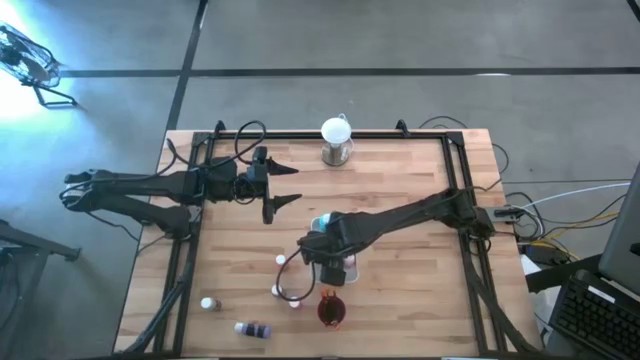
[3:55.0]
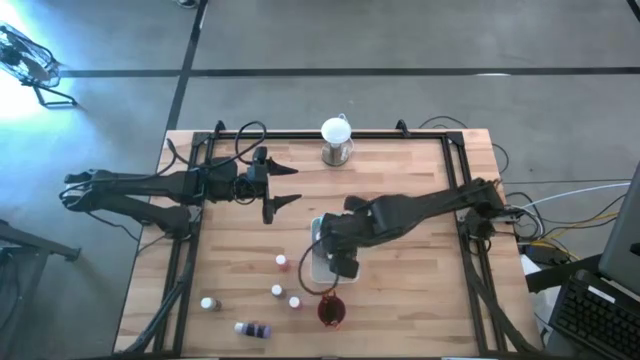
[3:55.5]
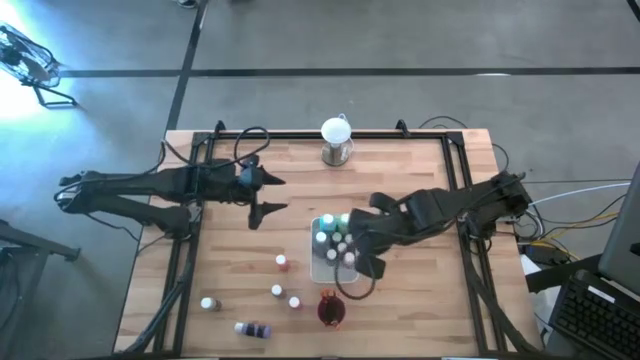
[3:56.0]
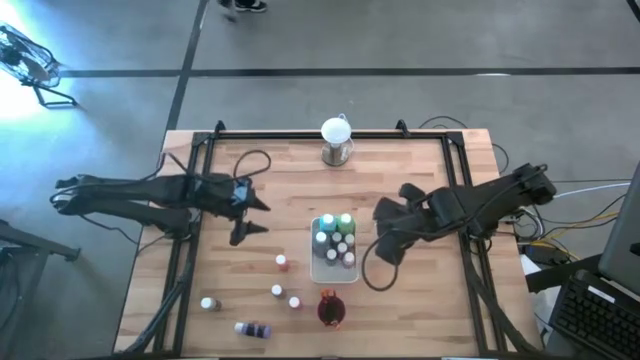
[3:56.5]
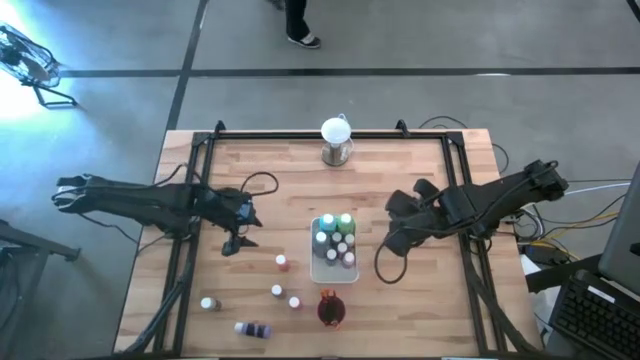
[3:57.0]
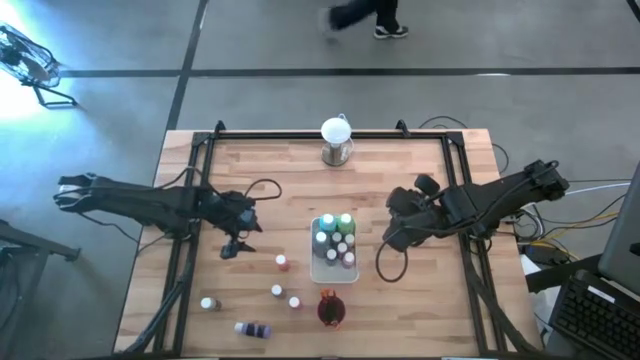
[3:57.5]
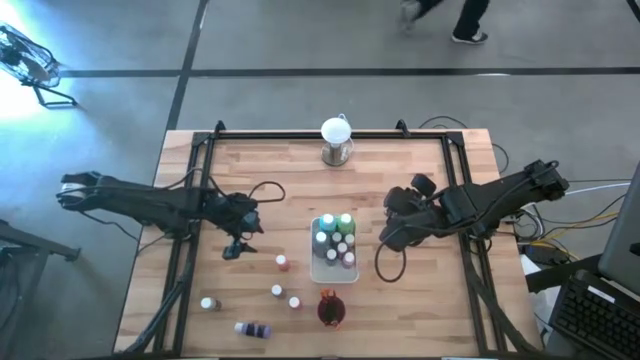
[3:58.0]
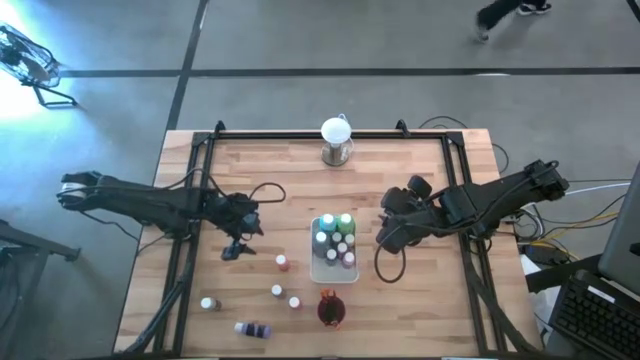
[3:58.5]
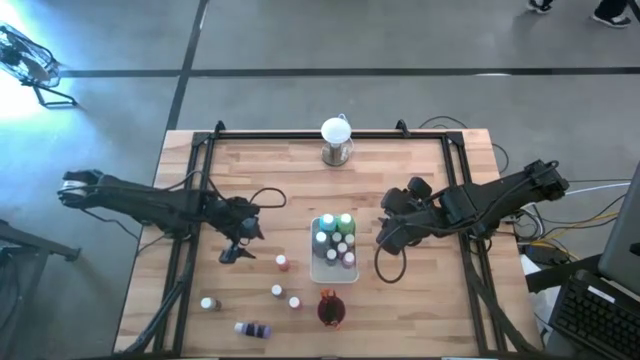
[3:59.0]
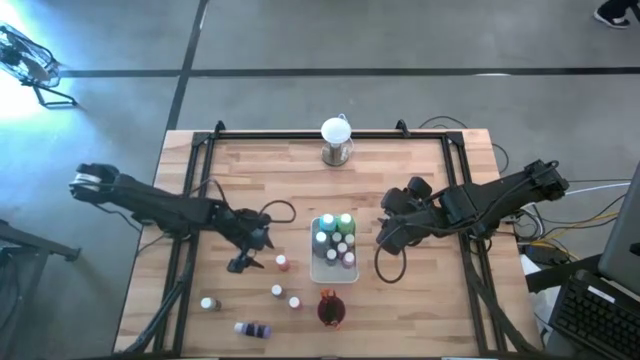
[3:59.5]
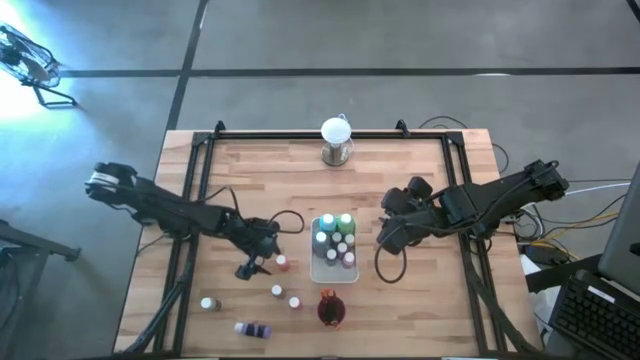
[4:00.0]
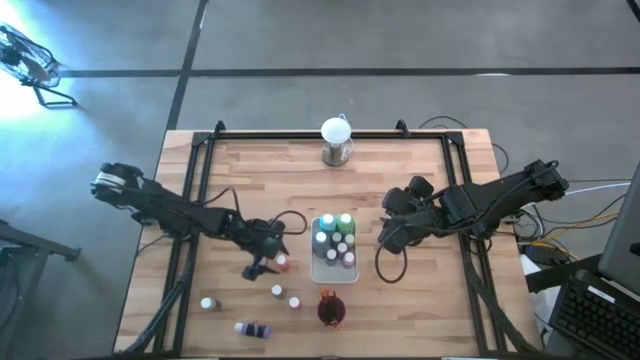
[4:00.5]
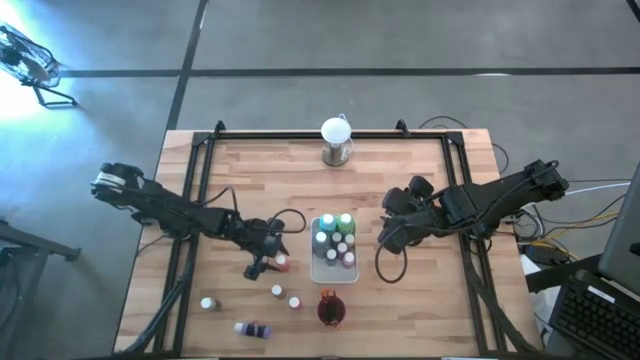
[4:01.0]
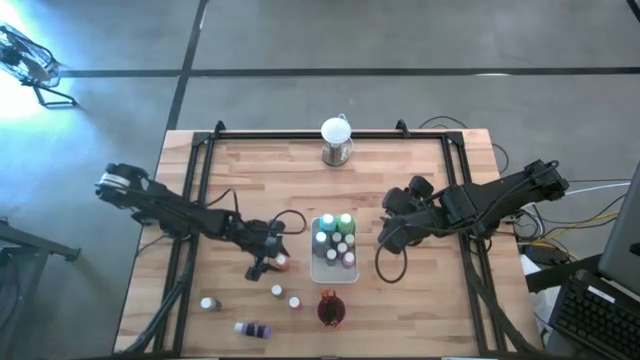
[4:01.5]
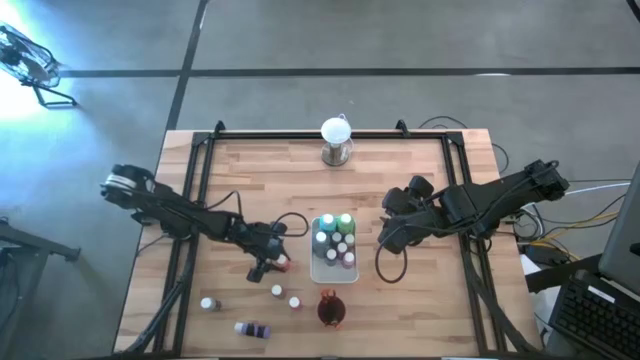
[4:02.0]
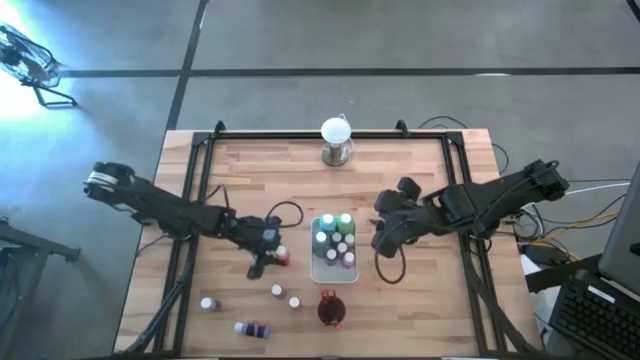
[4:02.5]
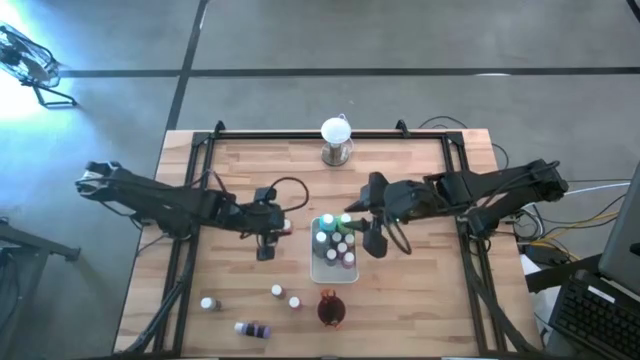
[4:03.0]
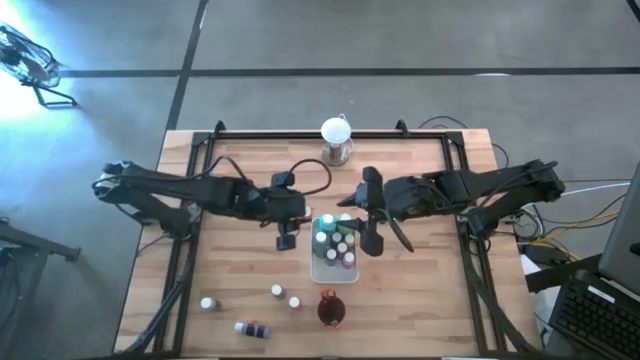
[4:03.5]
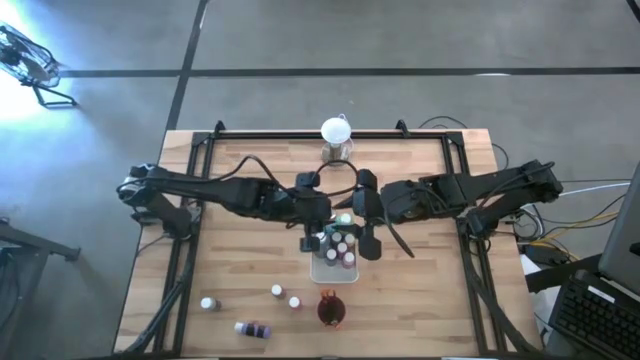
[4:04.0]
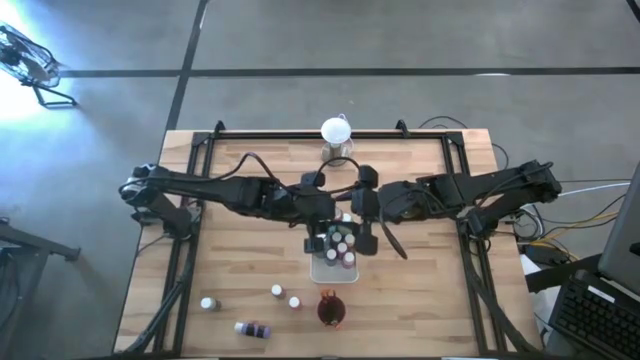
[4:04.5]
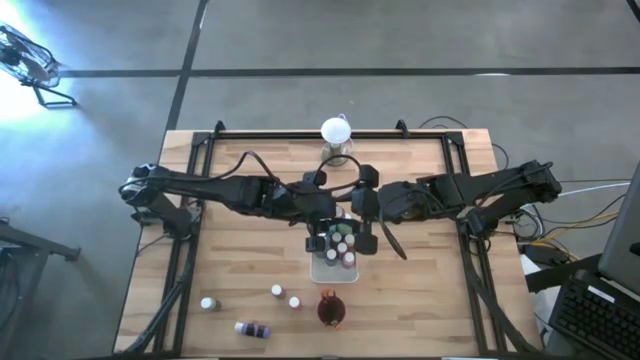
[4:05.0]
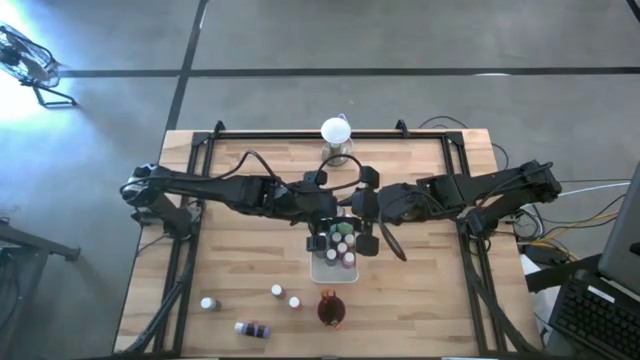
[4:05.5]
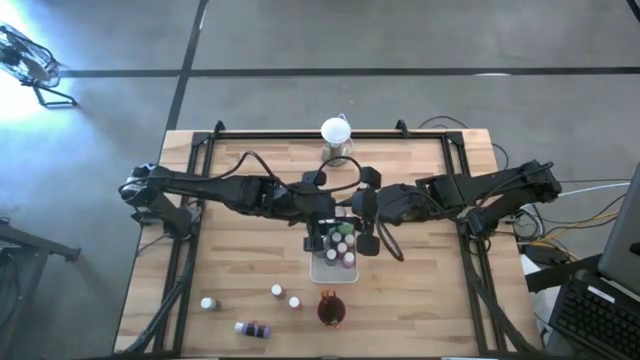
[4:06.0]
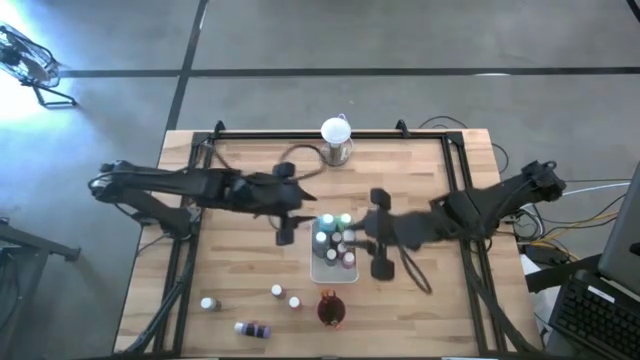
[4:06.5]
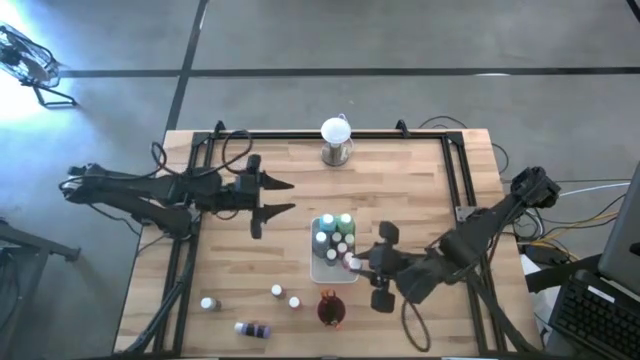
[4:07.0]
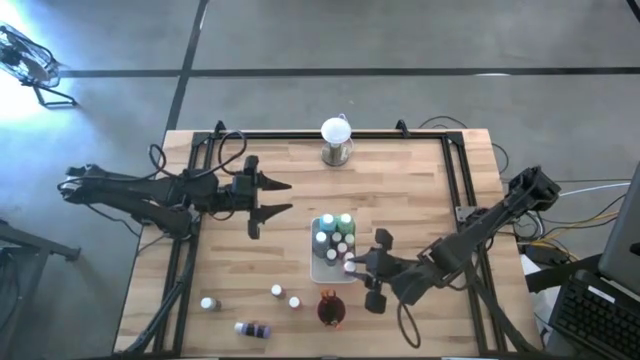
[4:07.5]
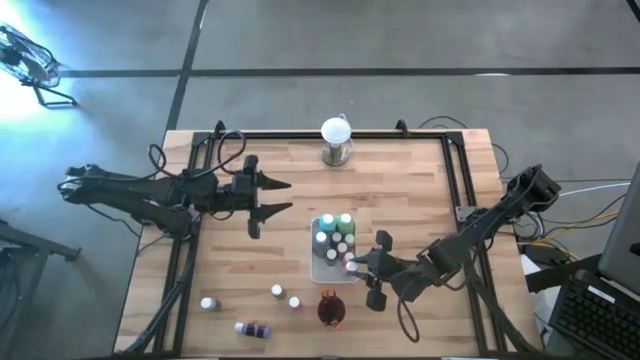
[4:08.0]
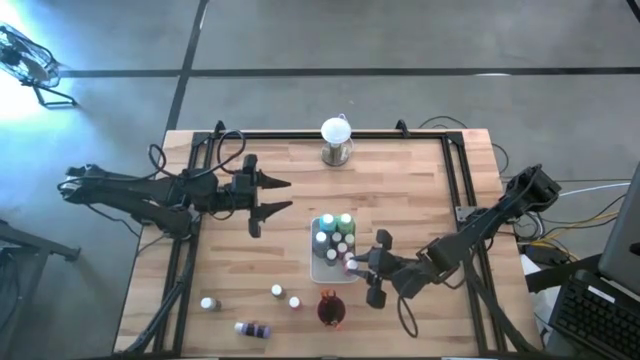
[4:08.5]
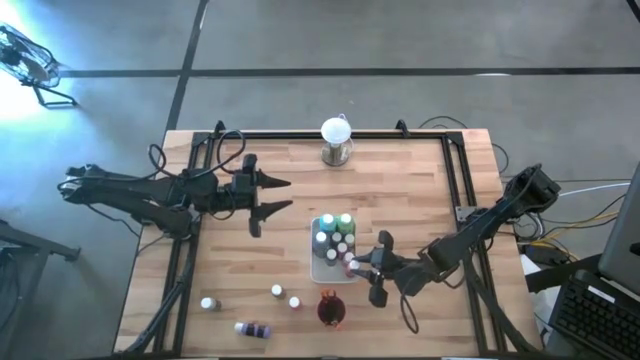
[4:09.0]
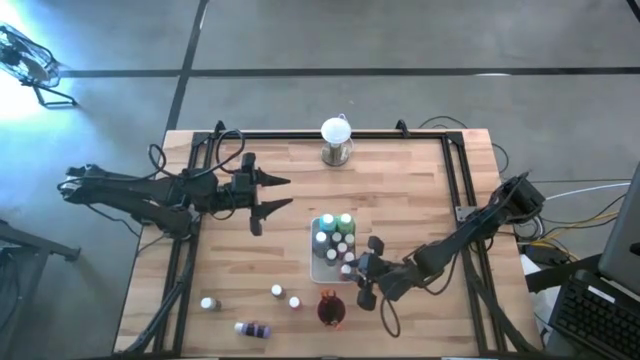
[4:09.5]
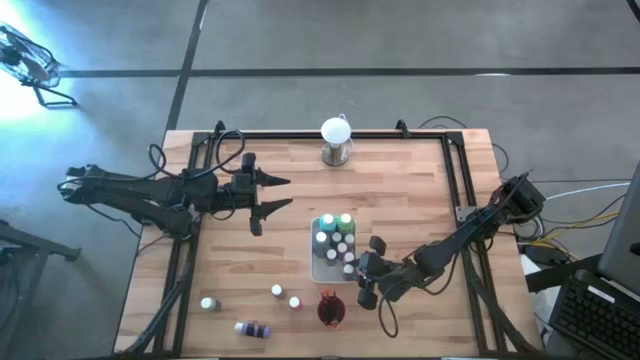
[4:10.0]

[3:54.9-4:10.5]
Task: Pick & Place Paint Supplies
Put the orange paint bottle into the white bin
